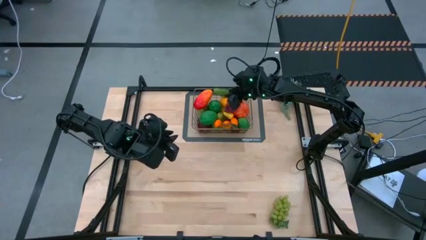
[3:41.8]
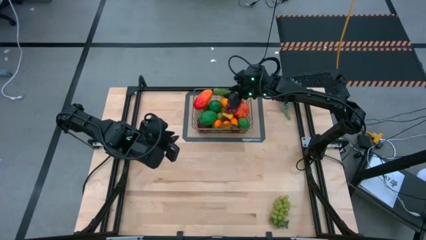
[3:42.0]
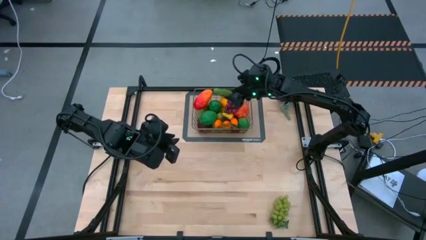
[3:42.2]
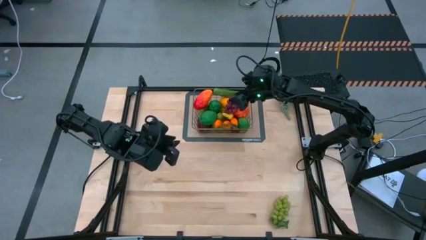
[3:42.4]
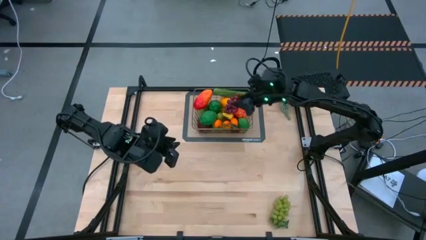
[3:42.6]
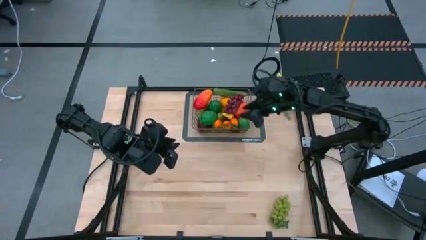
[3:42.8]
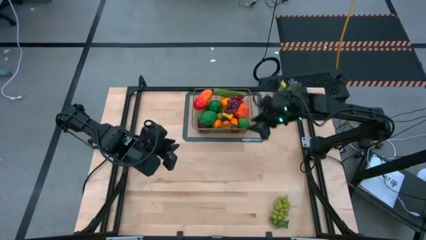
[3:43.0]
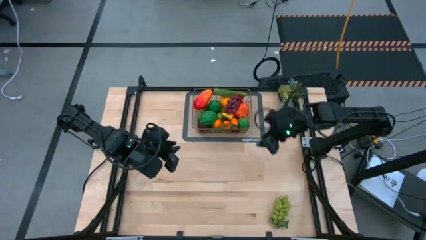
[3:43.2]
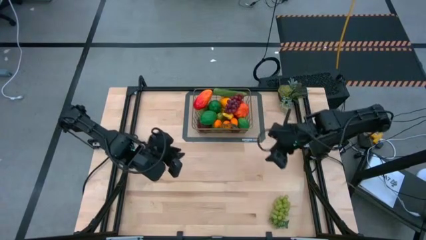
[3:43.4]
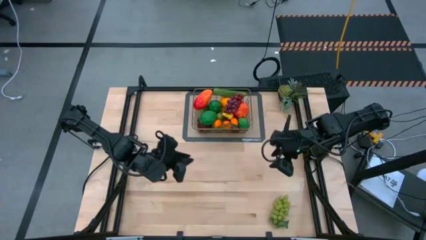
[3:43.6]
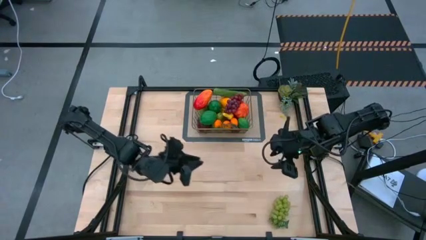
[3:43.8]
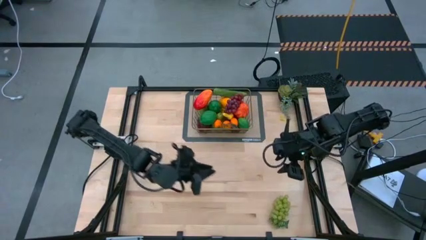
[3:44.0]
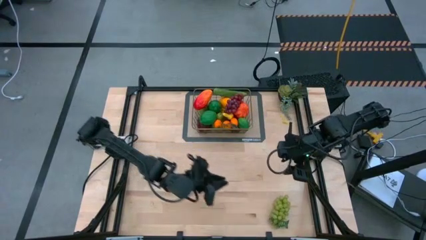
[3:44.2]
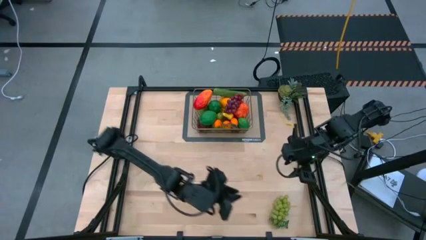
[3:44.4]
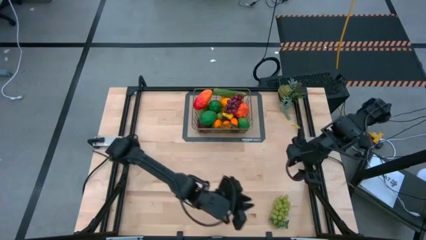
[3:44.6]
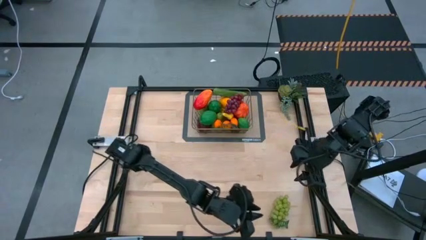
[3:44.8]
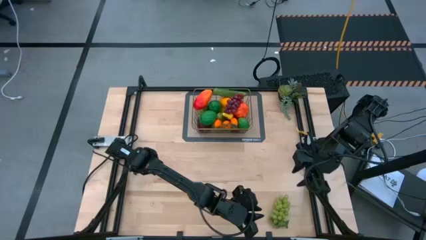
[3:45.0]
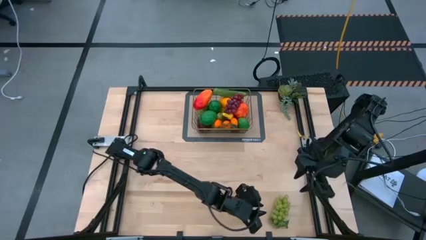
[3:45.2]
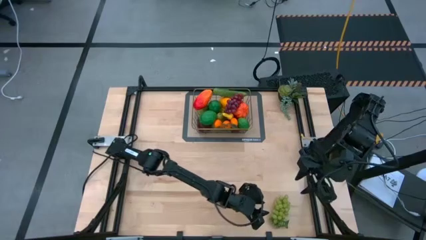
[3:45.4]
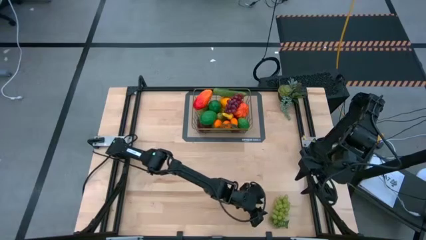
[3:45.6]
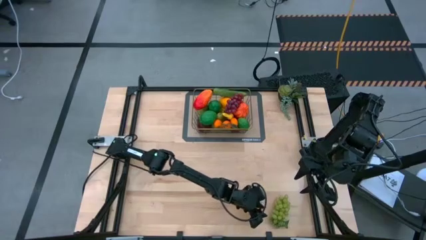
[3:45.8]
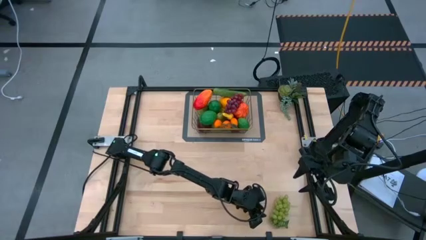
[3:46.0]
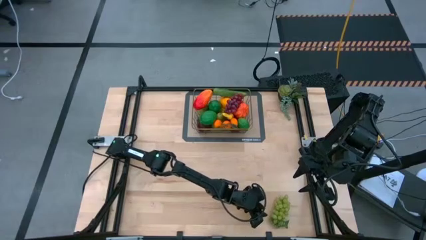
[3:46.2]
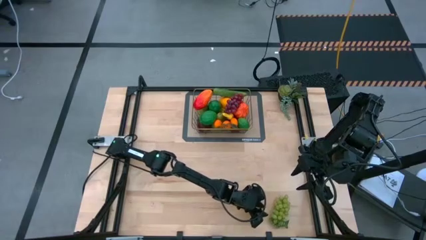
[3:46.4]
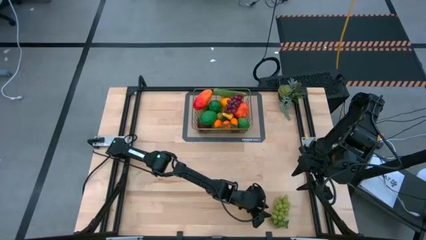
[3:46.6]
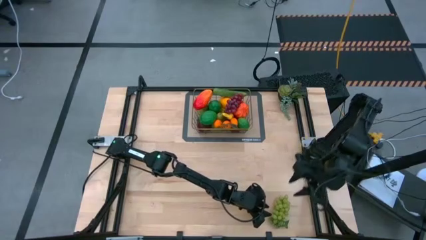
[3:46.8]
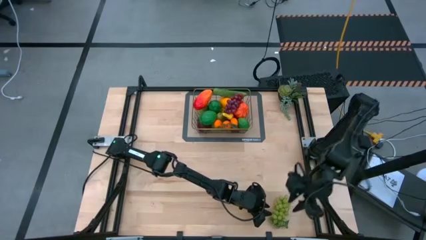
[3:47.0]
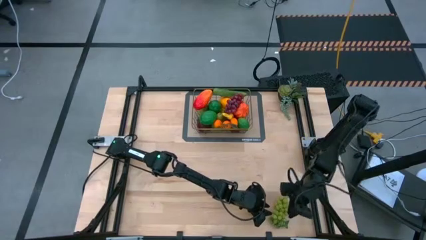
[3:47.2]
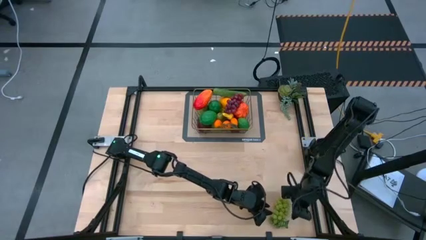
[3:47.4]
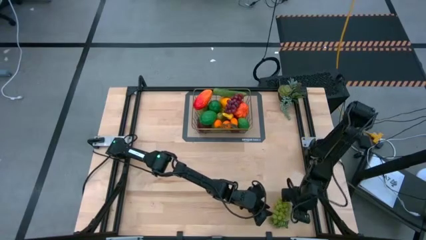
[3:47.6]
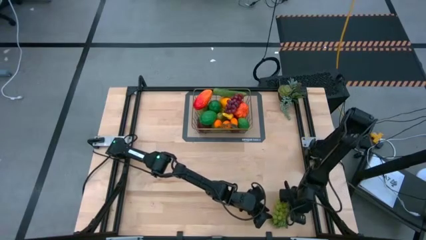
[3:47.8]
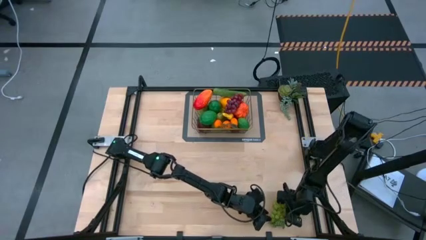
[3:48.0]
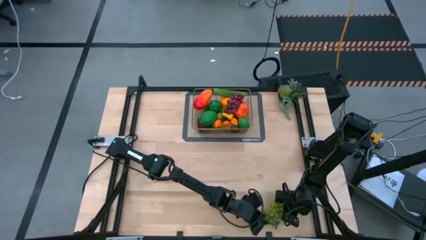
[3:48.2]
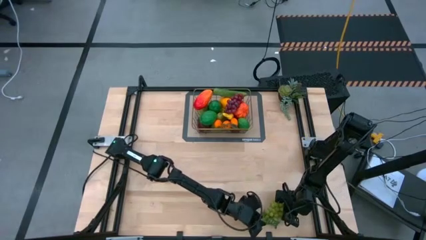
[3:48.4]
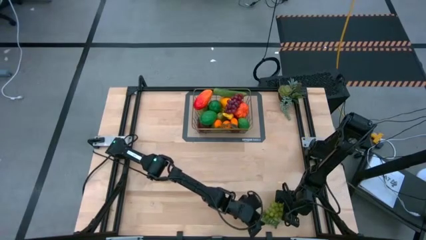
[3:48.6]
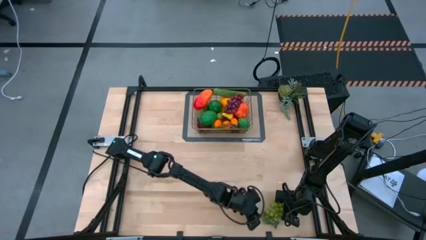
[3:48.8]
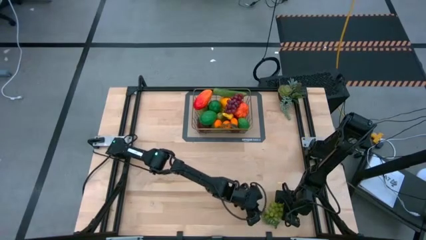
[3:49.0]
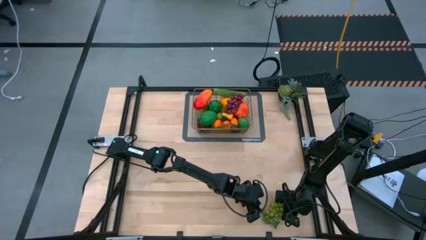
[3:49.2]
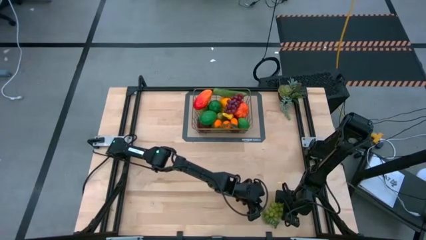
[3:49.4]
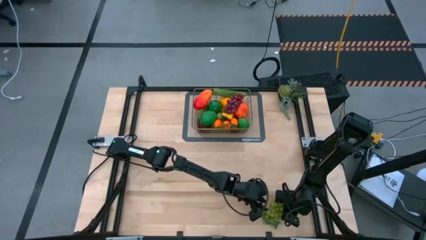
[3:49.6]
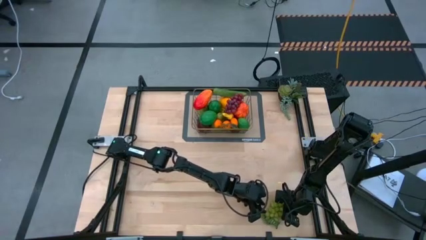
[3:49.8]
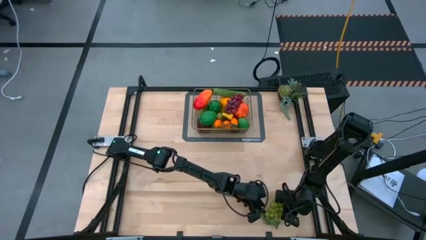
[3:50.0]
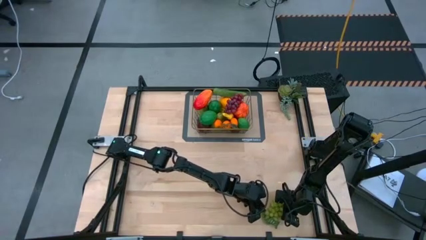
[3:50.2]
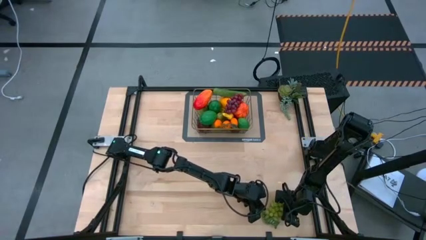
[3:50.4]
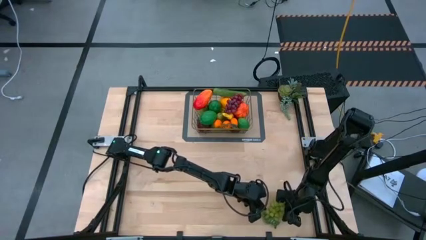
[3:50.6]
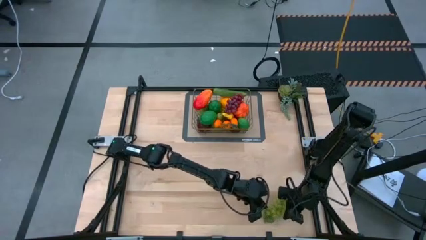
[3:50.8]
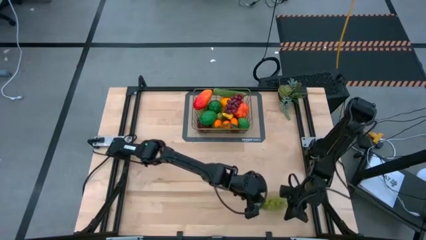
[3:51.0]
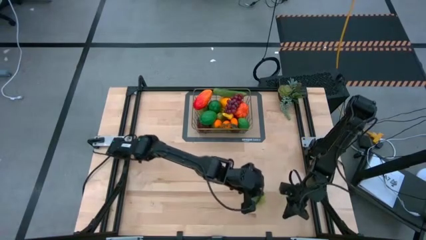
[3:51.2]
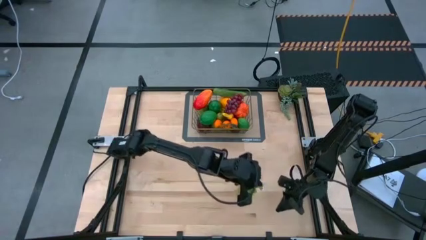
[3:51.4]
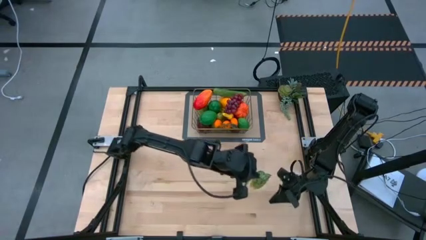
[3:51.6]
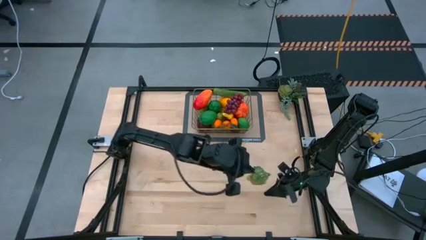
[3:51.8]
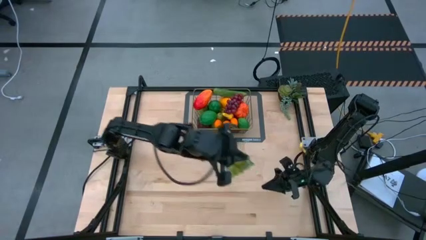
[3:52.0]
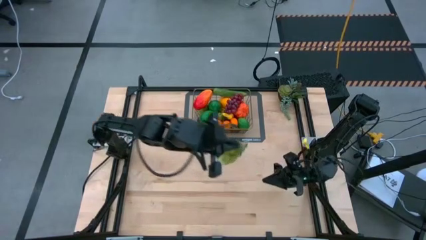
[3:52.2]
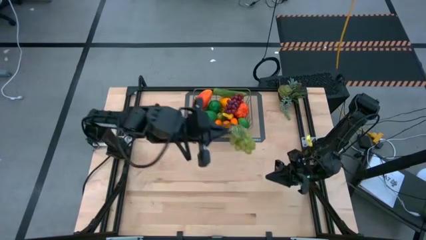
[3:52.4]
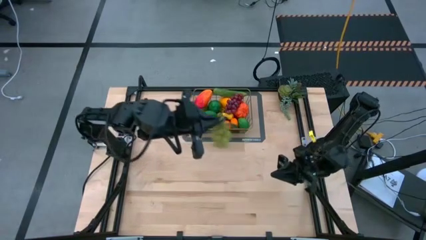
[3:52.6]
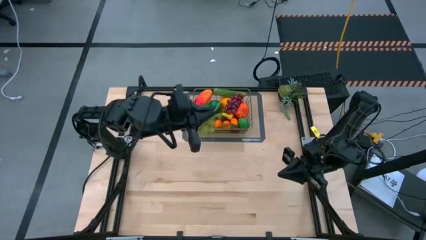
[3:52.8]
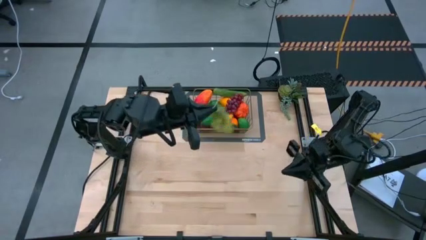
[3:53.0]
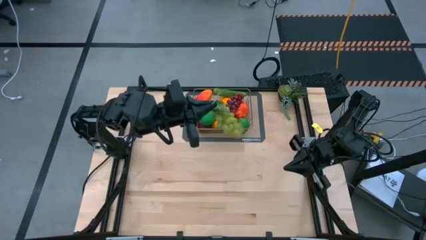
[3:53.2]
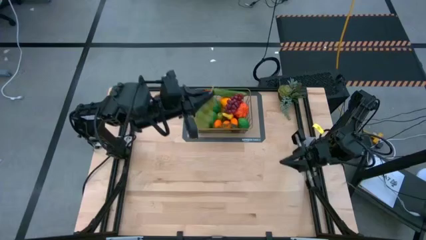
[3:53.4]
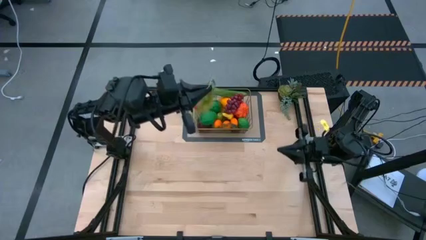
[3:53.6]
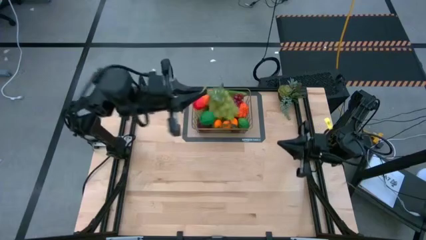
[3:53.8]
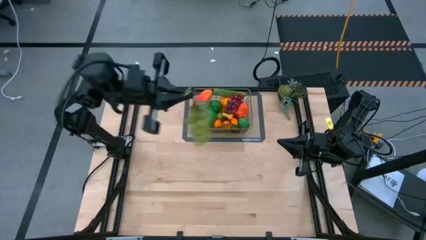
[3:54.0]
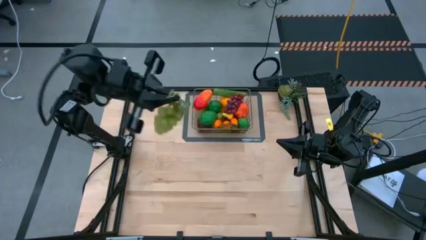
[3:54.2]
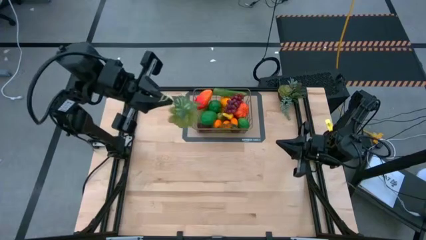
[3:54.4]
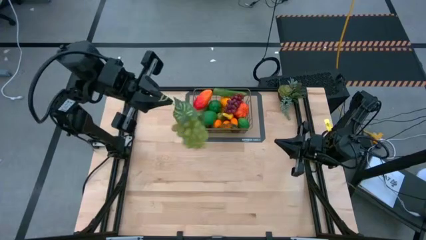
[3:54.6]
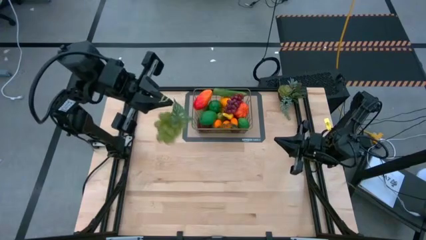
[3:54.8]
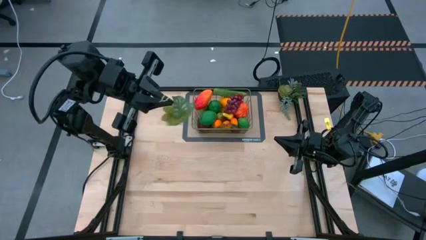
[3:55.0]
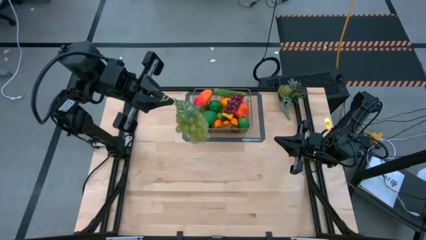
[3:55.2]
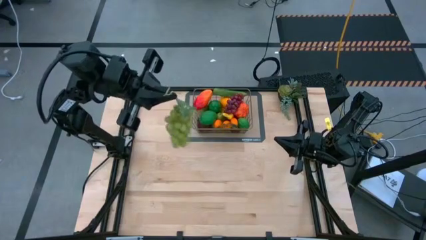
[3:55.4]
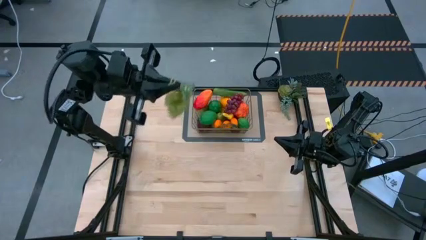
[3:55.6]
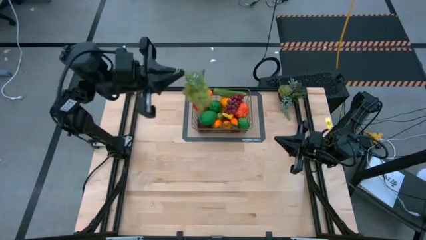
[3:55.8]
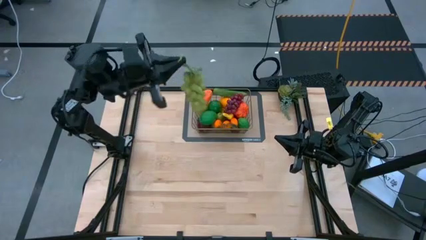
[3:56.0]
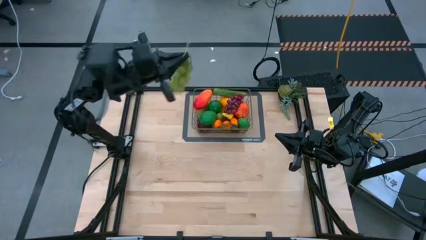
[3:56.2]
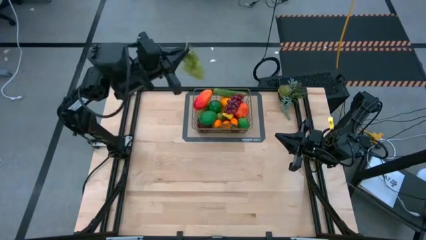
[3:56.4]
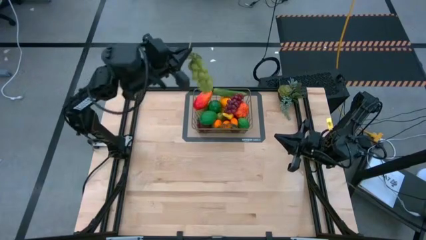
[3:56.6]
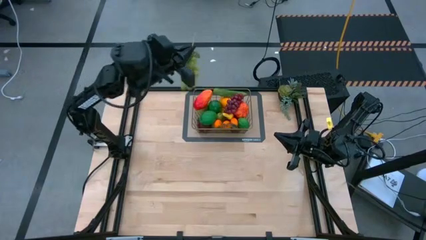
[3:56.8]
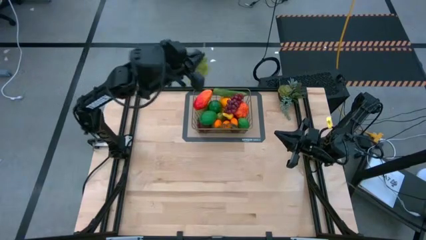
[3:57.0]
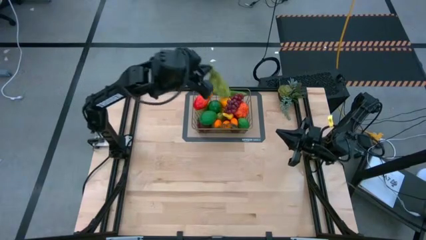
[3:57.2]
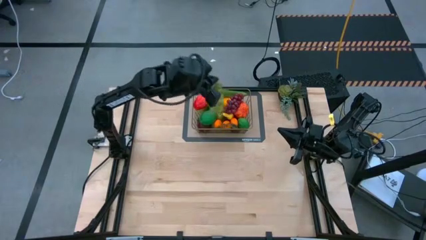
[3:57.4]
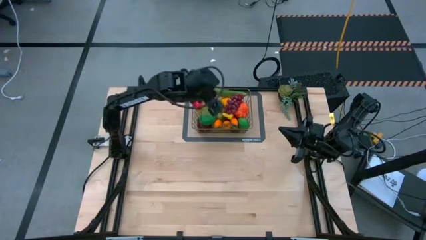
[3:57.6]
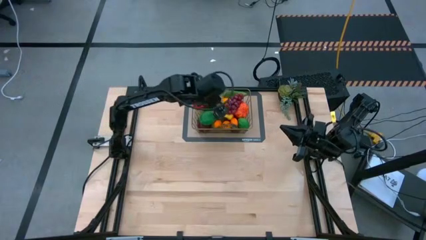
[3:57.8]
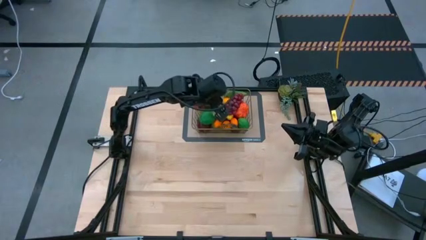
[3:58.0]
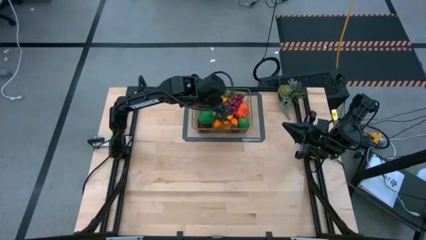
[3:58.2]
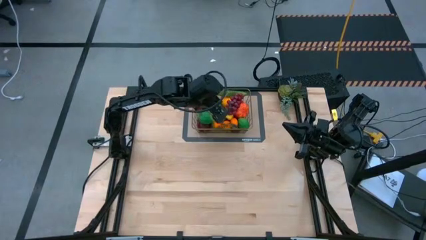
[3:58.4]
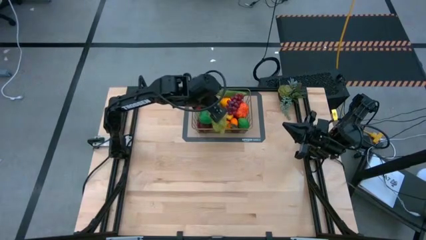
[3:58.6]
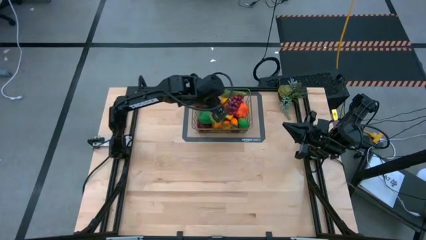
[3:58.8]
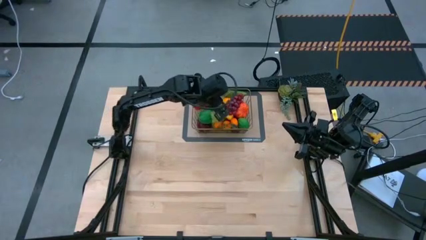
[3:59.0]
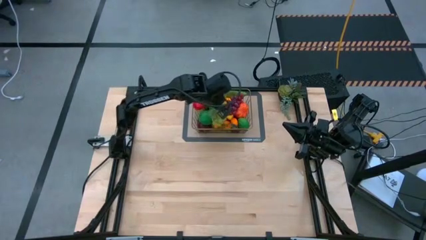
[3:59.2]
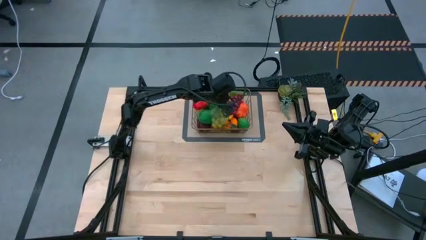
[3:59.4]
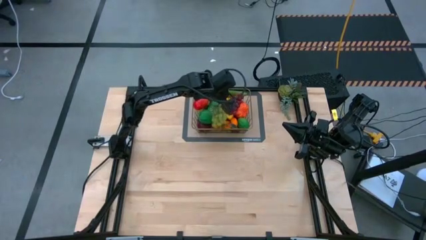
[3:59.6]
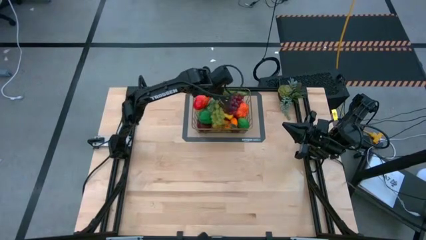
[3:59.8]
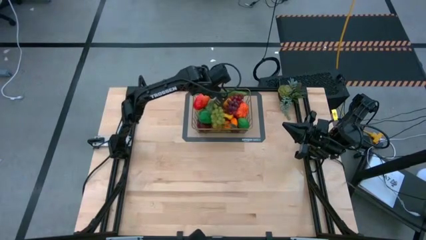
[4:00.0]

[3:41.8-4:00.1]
Task: Build produce basket
Put the green grapes into the brown wire basket
